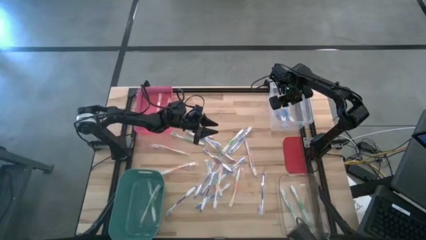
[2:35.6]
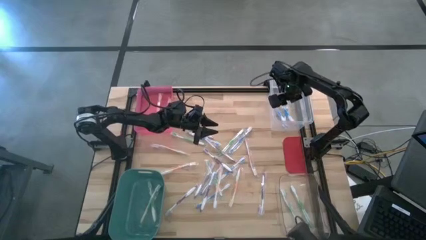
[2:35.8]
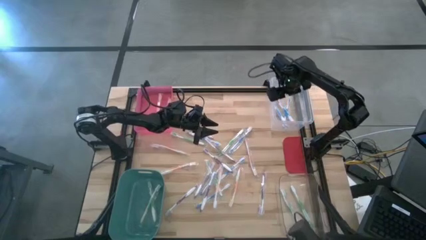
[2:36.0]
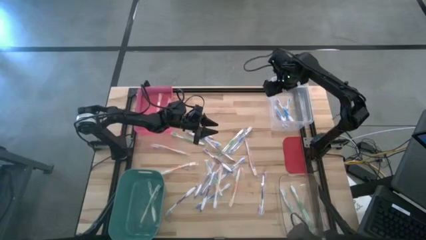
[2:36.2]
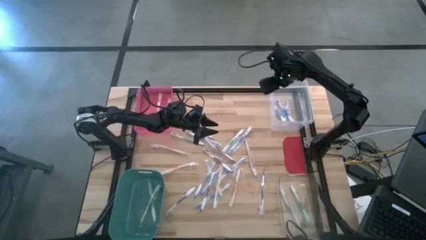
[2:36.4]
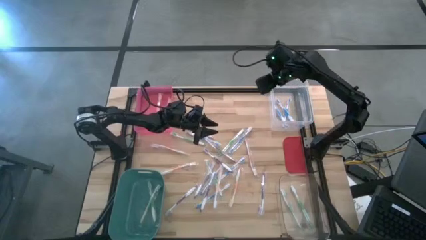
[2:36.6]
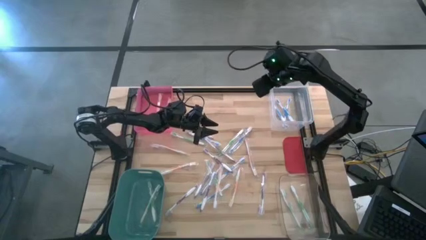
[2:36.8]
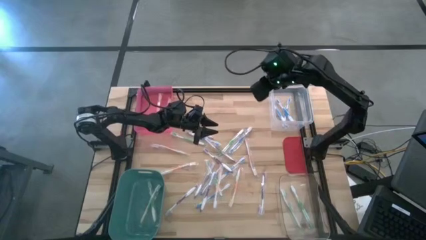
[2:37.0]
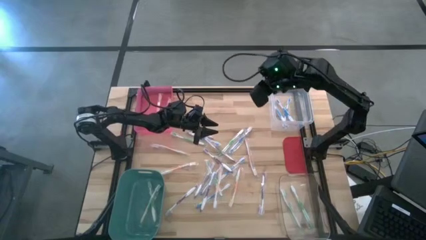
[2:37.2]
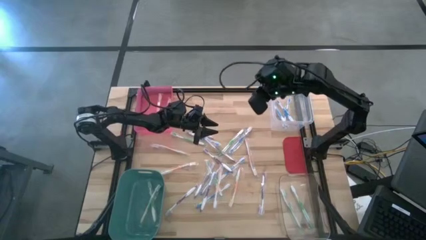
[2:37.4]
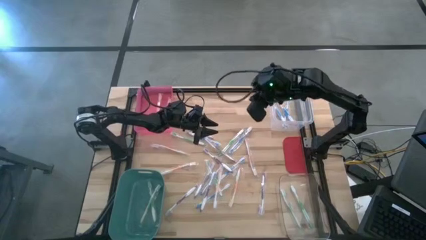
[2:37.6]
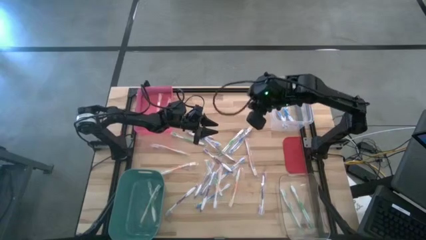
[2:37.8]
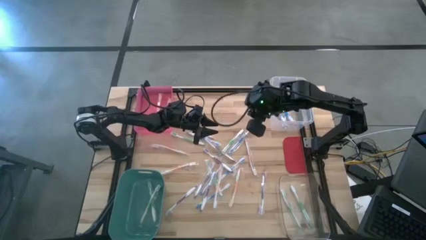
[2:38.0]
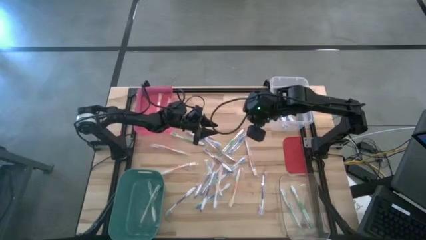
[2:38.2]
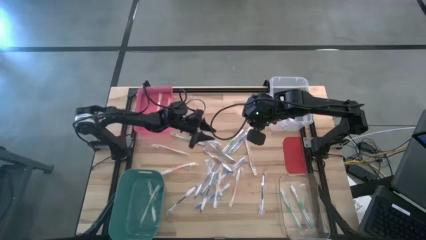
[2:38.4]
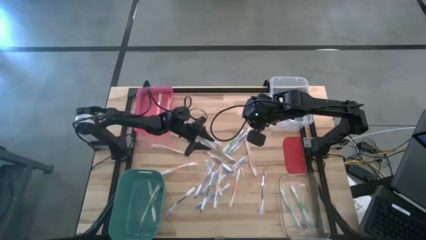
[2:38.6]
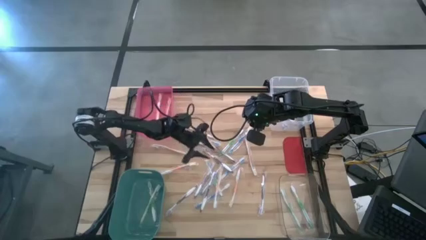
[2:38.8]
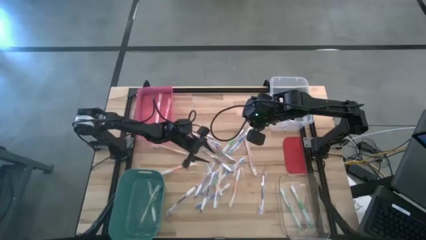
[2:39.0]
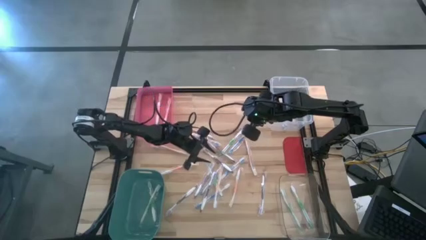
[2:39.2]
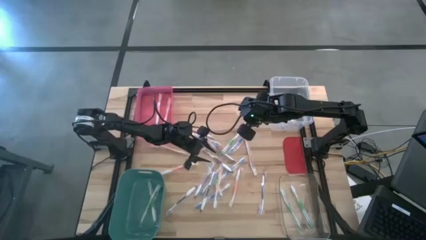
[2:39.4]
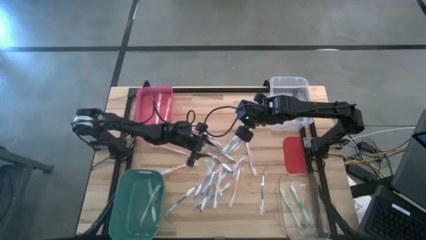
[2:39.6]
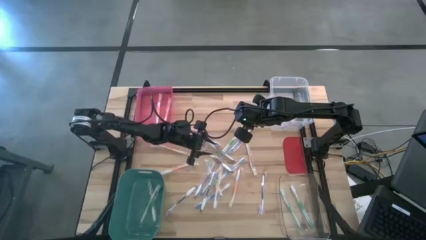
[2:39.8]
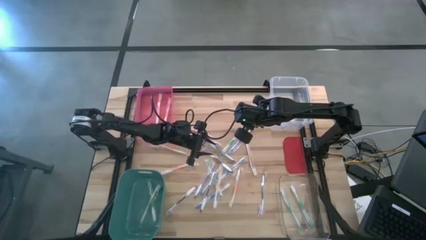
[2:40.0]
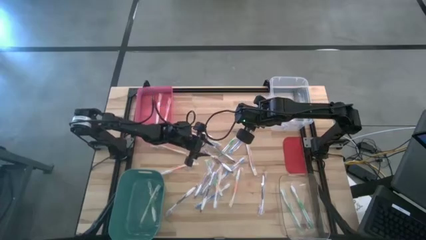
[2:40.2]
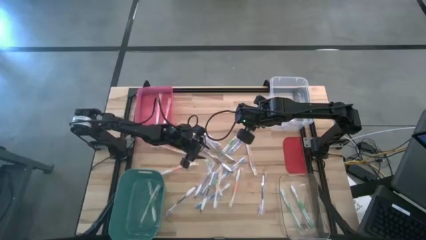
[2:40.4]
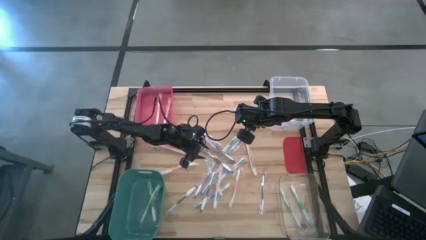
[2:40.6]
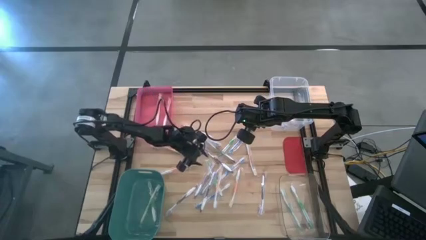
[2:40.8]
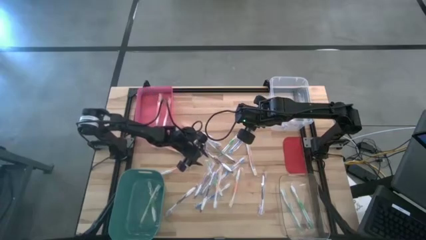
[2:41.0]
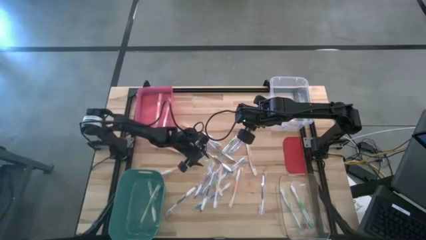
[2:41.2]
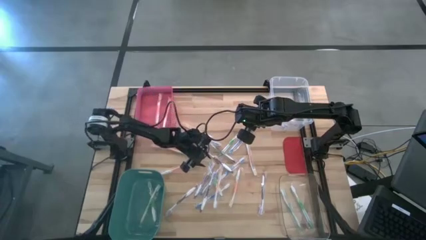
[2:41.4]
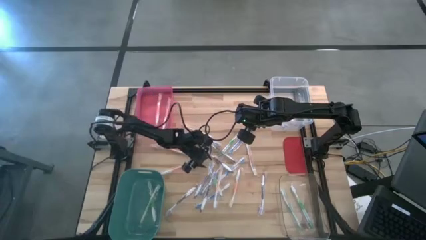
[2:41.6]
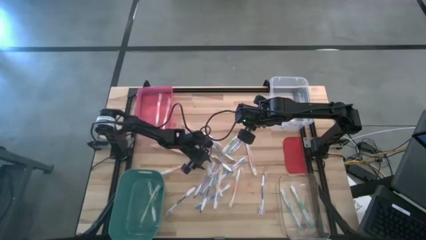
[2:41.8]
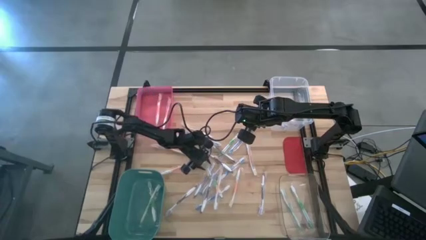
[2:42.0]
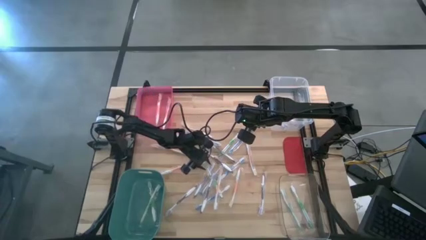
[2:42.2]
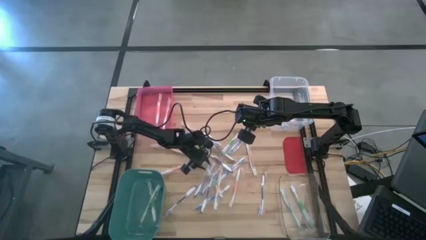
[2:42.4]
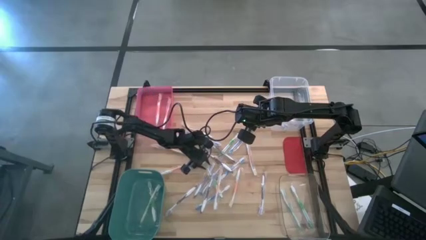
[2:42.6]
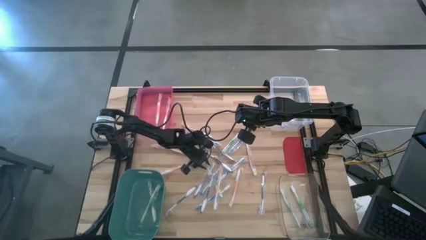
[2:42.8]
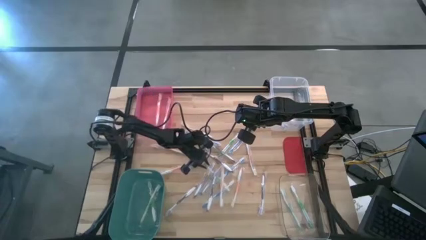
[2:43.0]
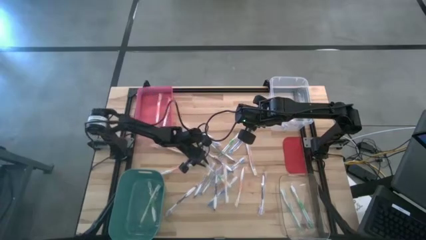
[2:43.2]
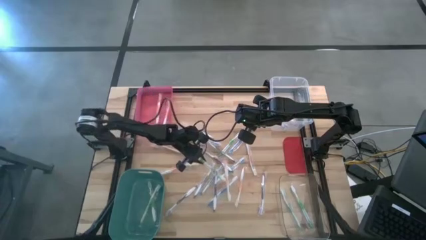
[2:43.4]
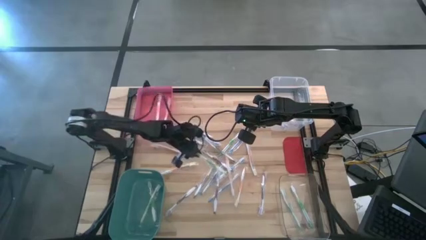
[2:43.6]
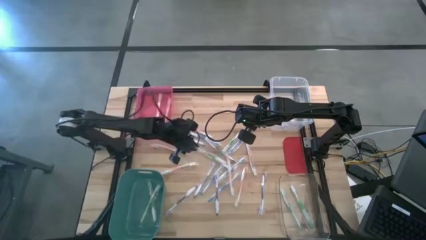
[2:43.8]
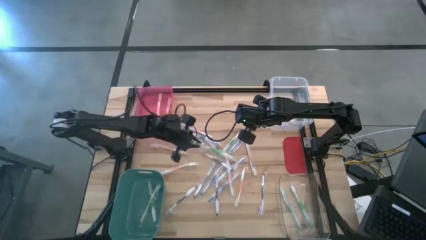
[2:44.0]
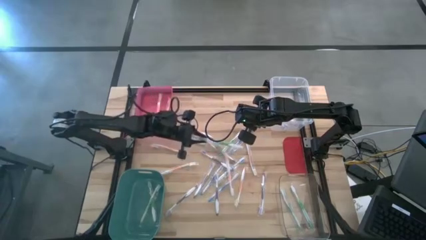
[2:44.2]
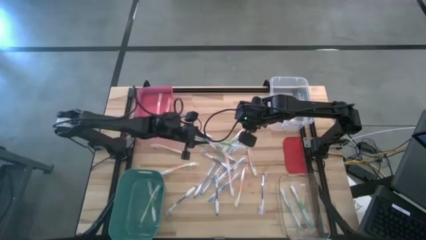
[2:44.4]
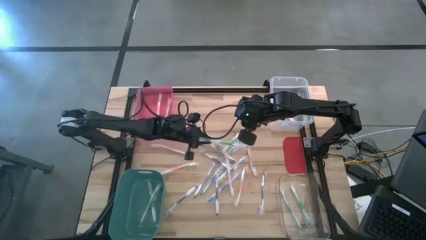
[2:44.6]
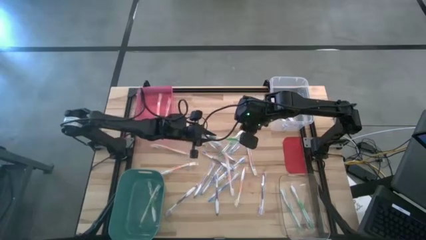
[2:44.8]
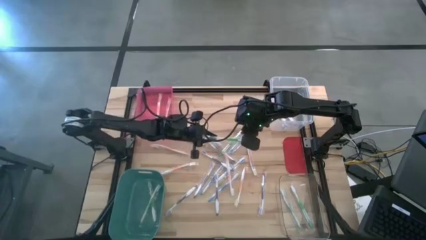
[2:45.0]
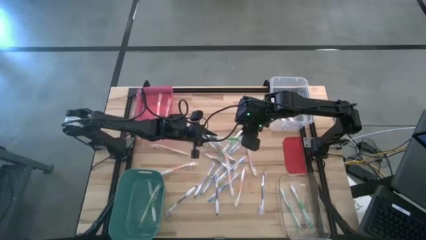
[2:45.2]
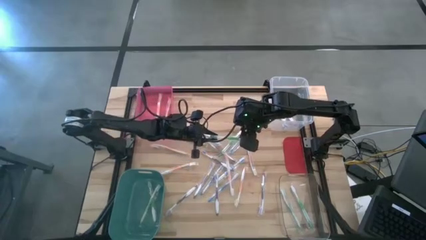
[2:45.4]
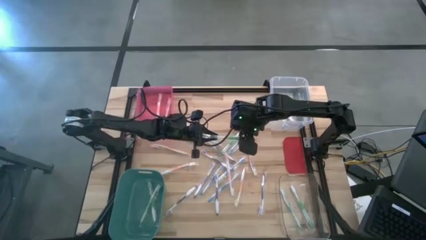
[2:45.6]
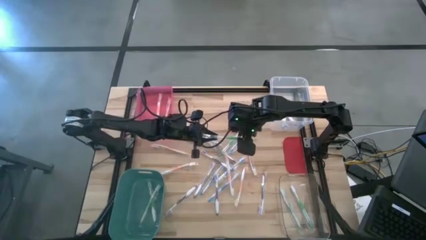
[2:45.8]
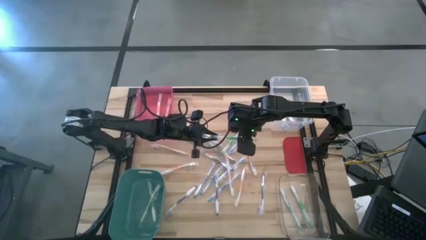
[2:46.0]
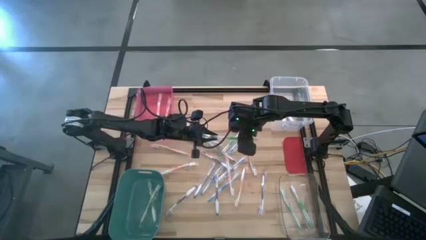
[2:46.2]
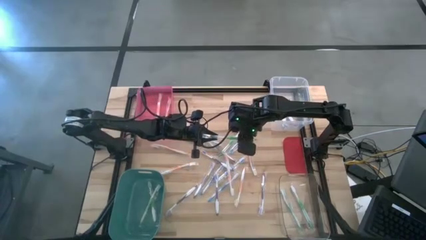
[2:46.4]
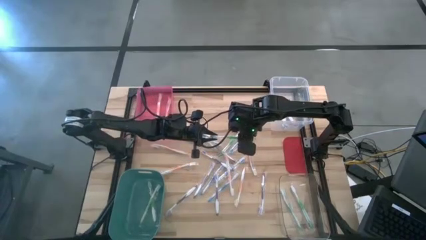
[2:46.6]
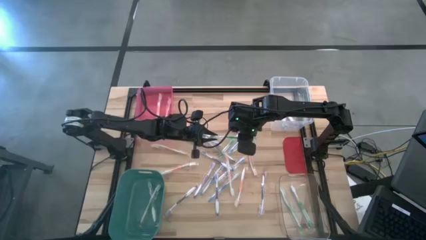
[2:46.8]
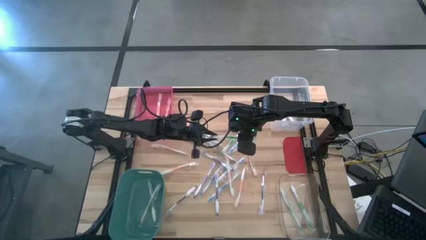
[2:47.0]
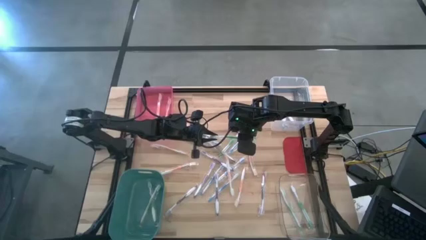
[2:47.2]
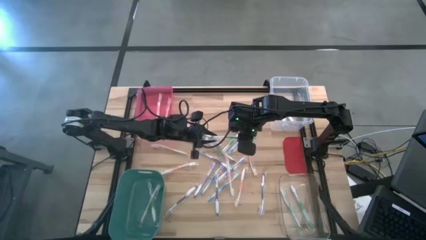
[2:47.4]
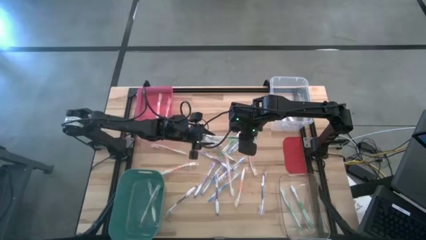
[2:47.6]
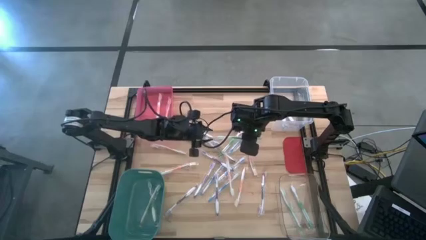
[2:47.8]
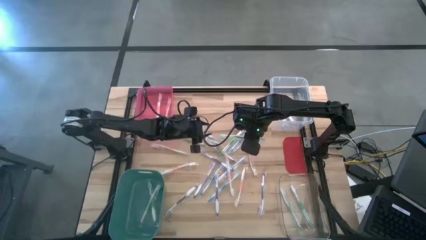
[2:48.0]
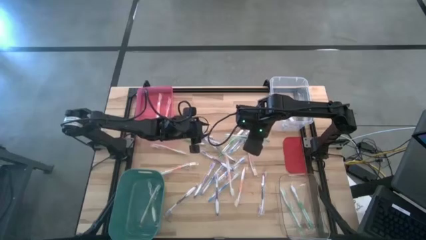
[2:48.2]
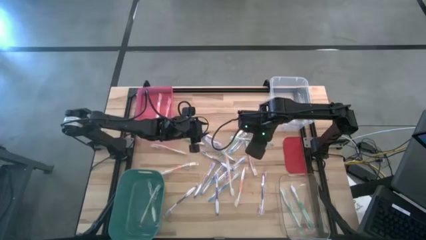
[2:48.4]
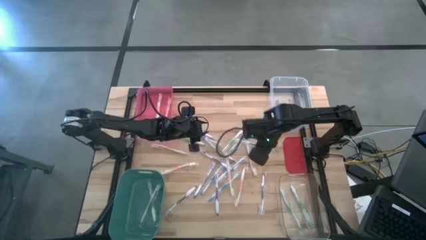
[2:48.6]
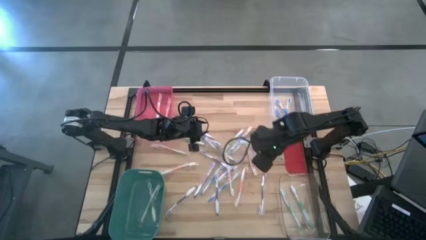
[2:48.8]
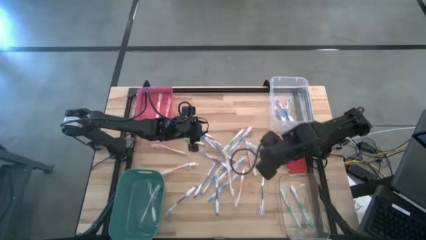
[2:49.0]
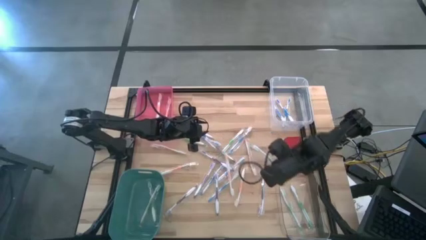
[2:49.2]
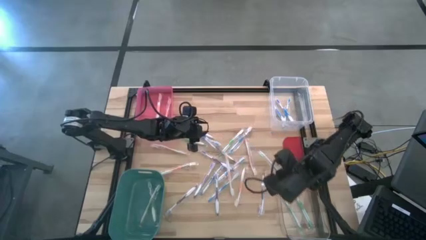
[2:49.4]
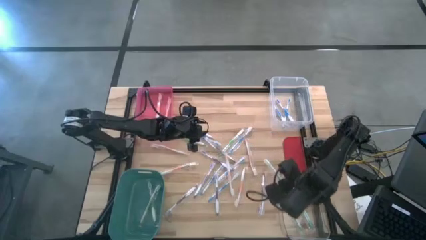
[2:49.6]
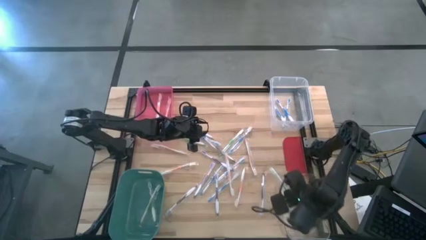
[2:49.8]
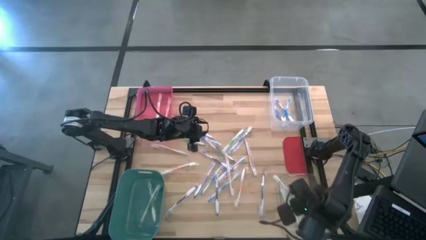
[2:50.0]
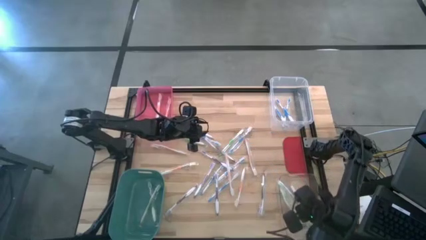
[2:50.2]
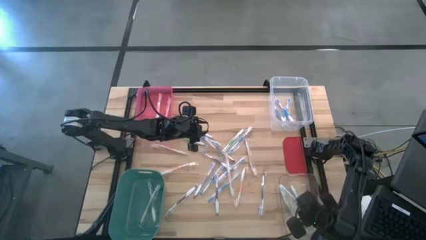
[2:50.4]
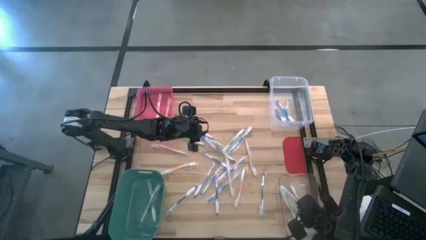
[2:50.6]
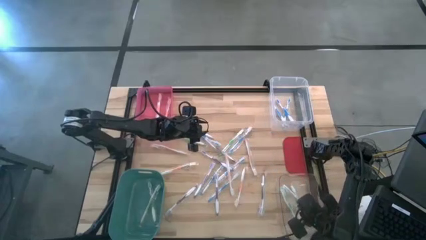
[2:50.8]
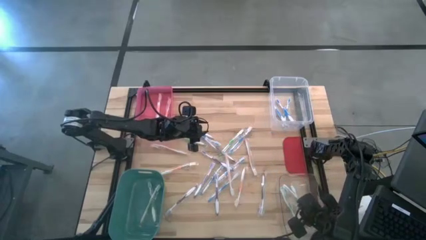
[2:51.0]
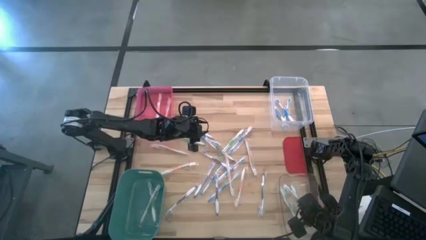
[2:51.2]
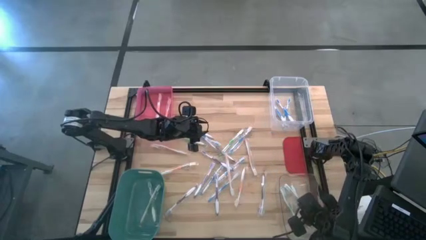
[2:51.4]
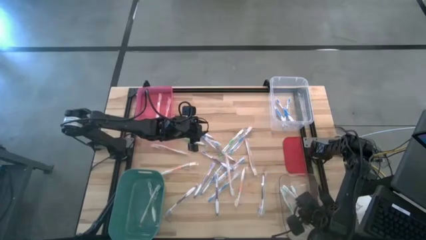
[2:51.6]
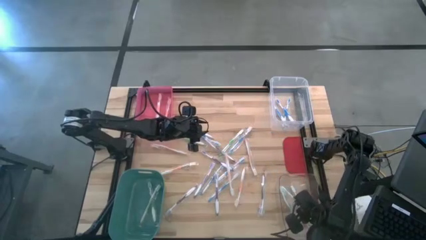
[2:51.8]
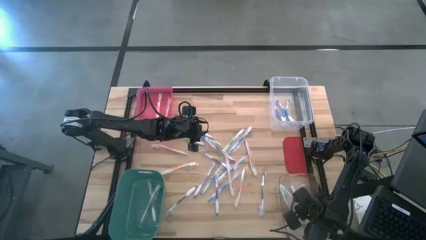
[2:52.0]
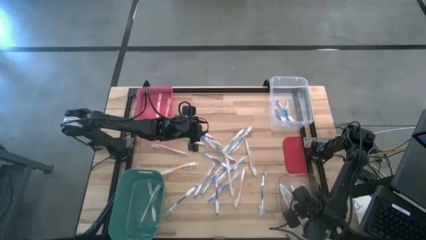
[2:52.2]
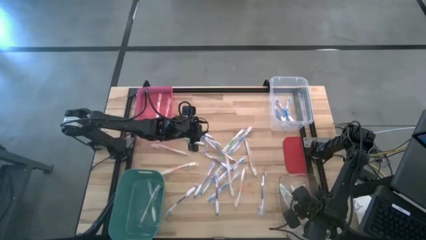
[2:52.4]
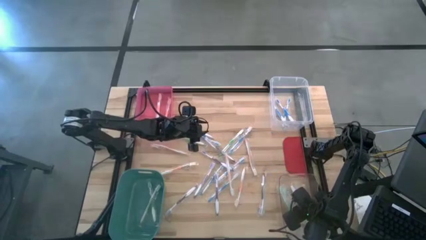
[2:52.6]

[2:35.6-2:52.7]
Task: Pick & Place Toothbrushes
Put the green toothbrush into the green bin
